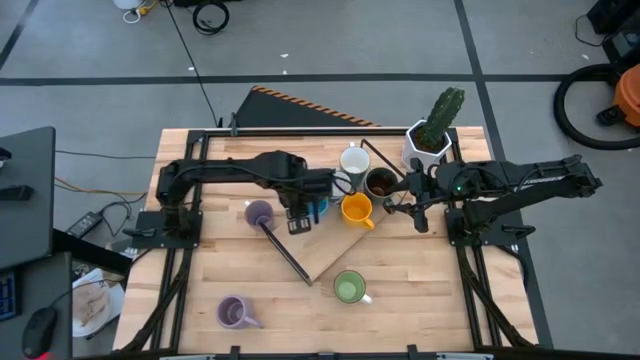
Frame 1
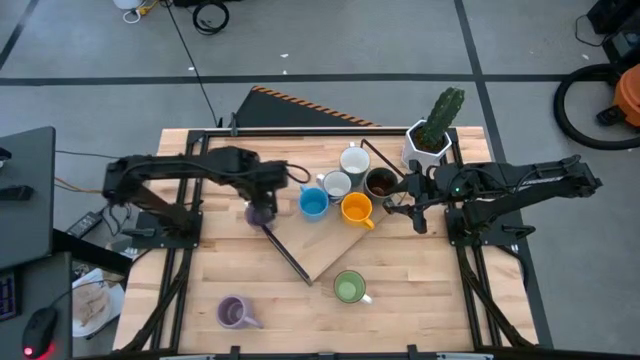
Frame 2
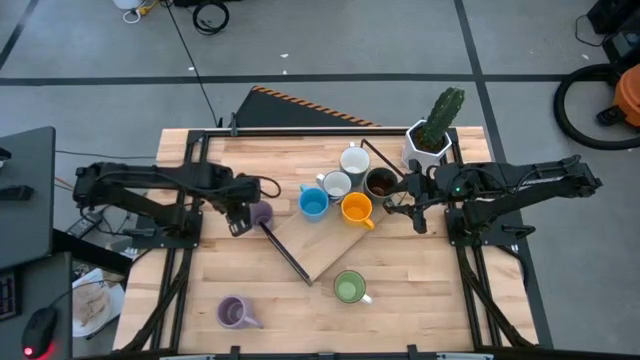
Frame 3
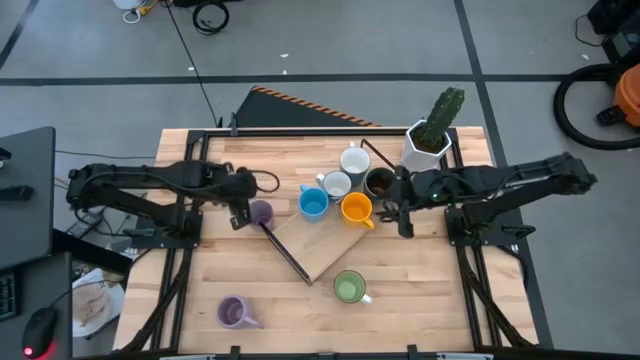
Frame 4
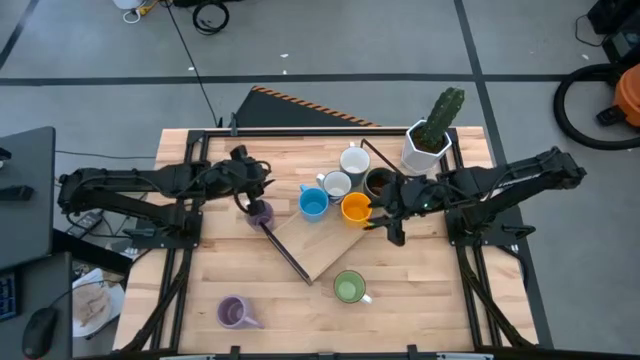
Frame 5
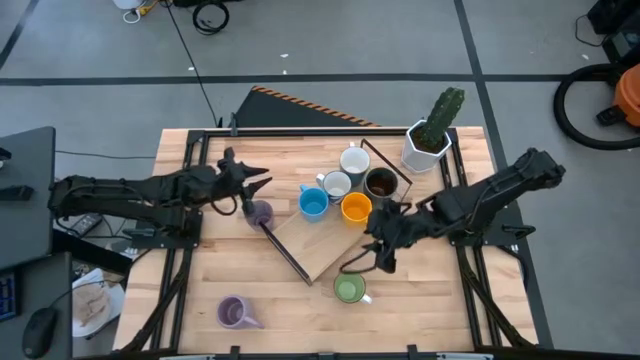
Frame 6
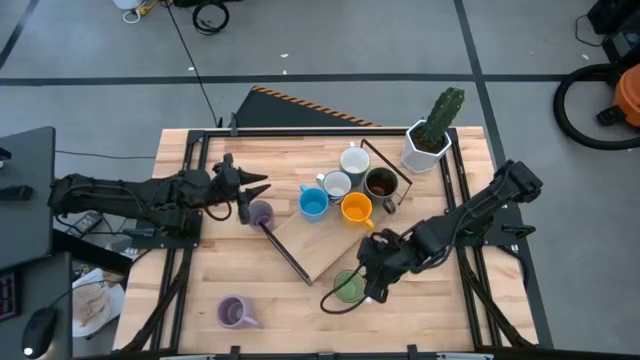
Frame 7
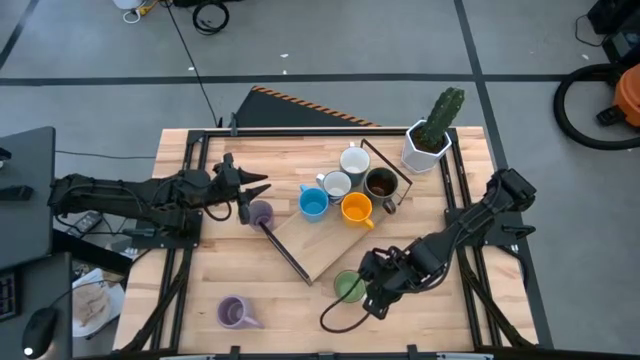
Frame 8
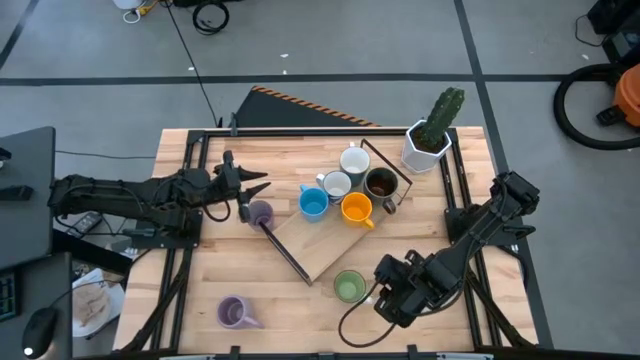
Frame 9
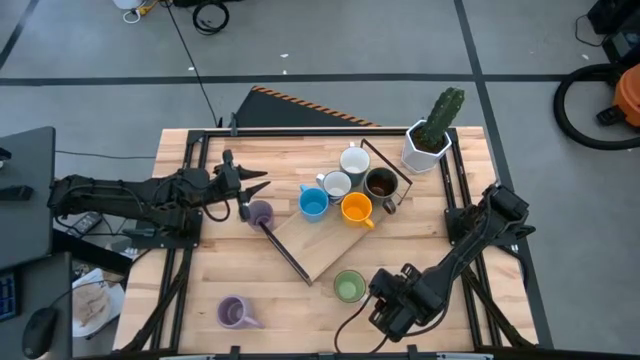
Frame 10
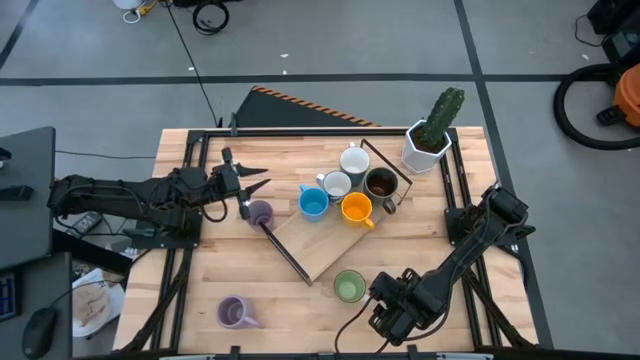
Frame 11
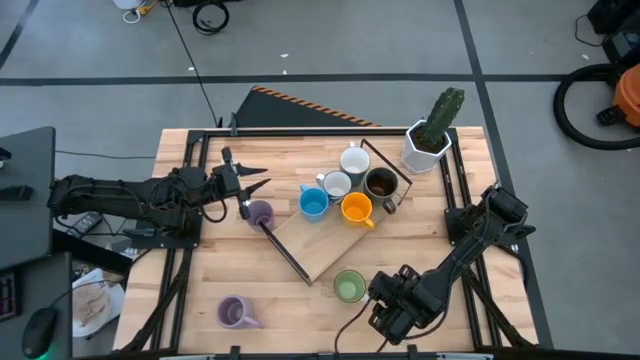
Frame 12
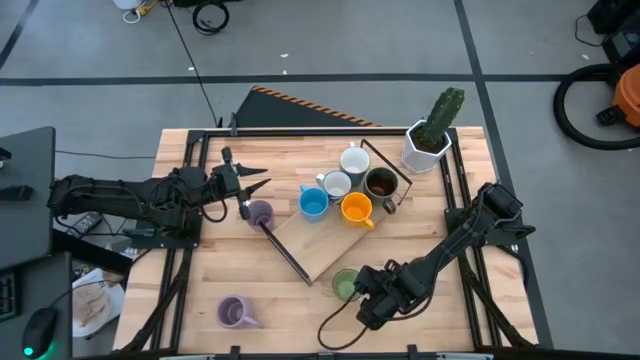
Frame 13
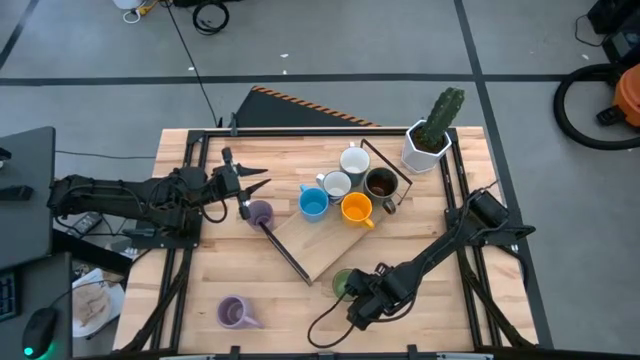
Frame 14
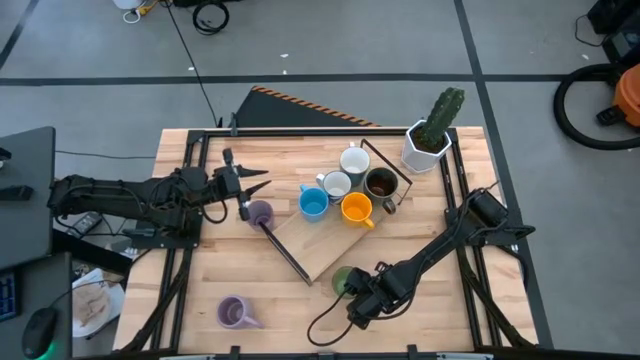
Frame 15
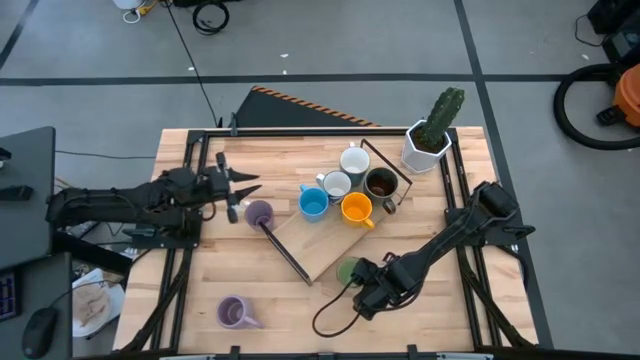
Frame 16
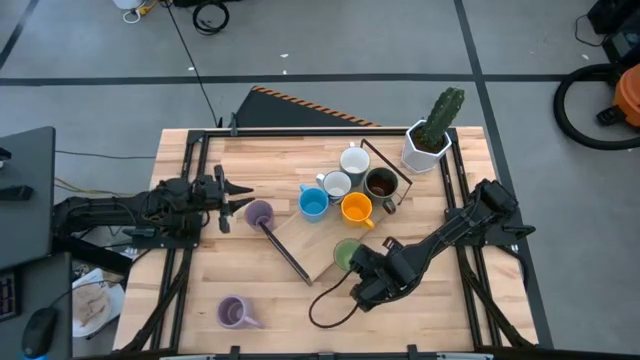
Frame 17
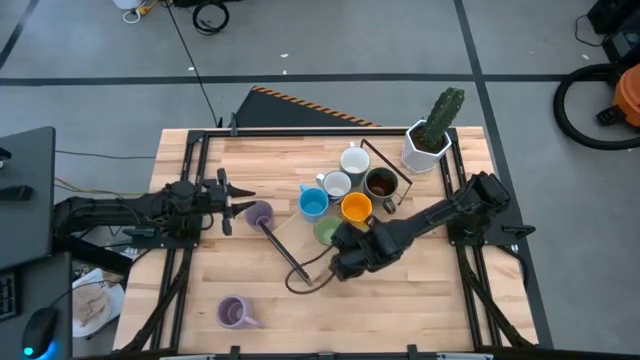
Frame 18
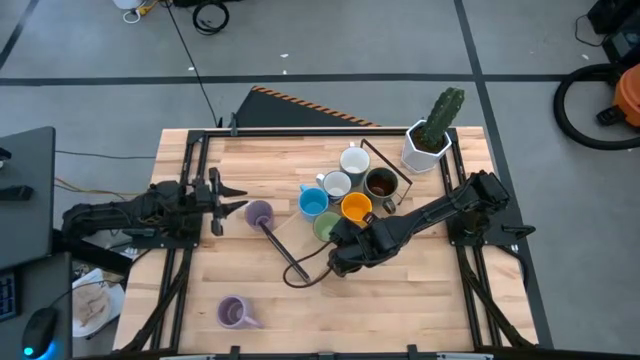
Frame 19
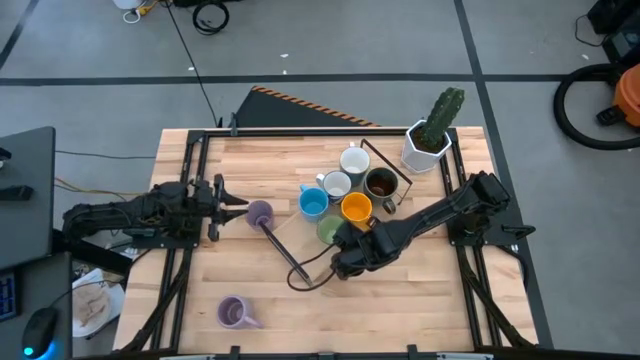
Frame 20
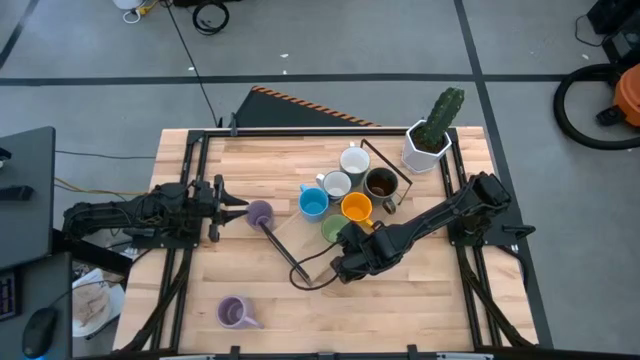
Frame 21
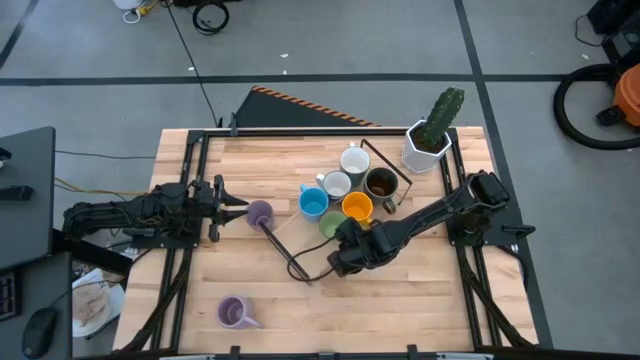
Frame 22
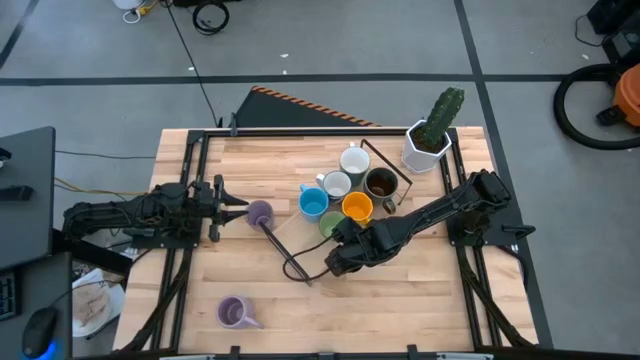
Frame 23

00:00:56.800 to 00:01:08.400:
Task: Place coffee mugs
Put the white-green mug on the shelf

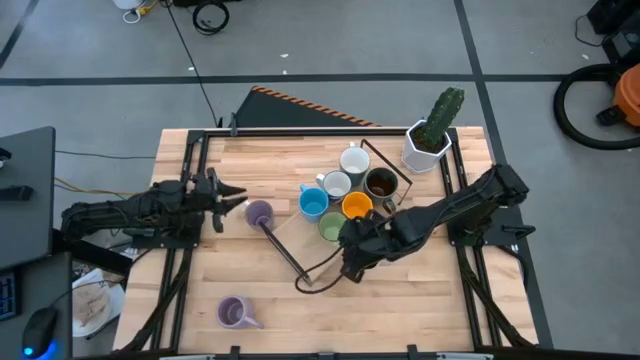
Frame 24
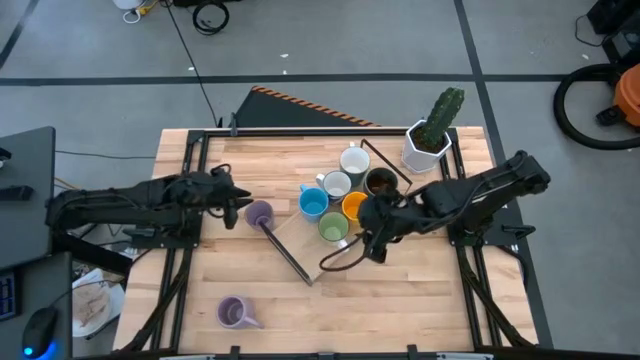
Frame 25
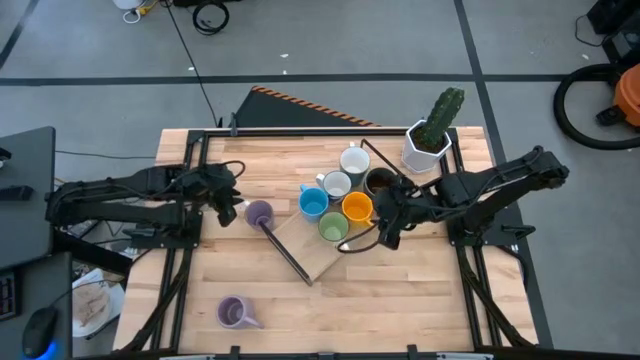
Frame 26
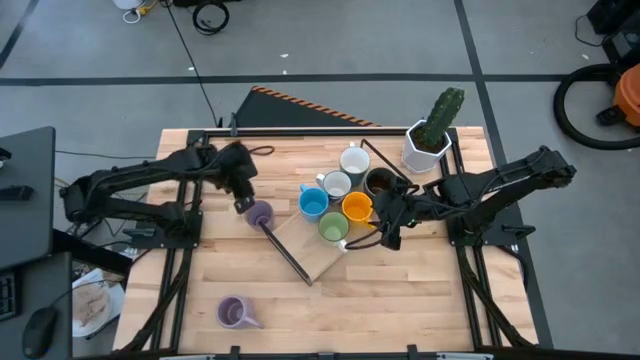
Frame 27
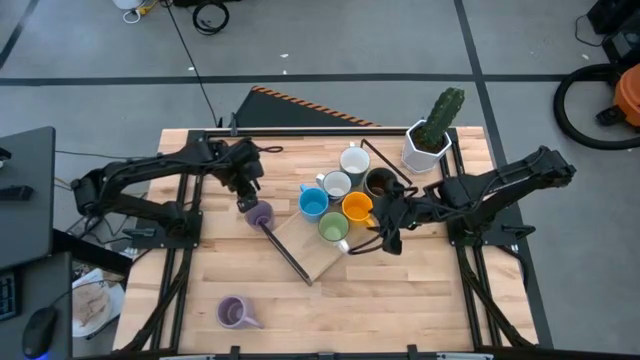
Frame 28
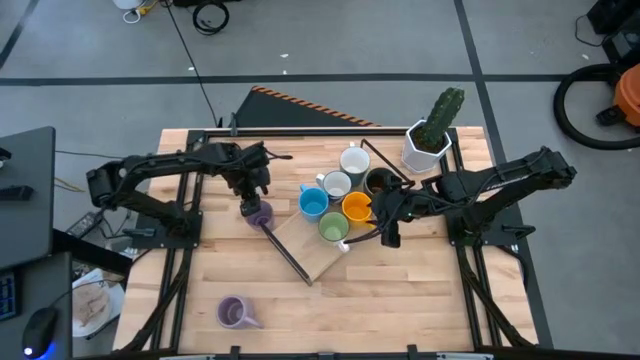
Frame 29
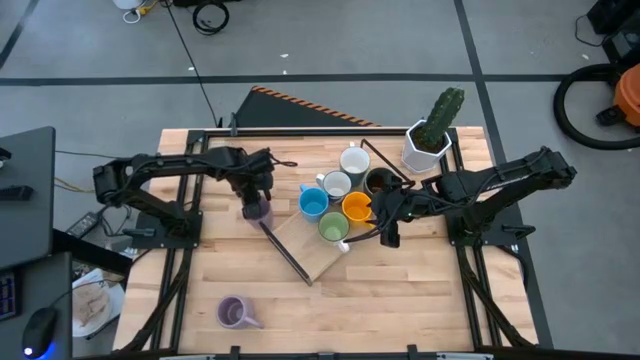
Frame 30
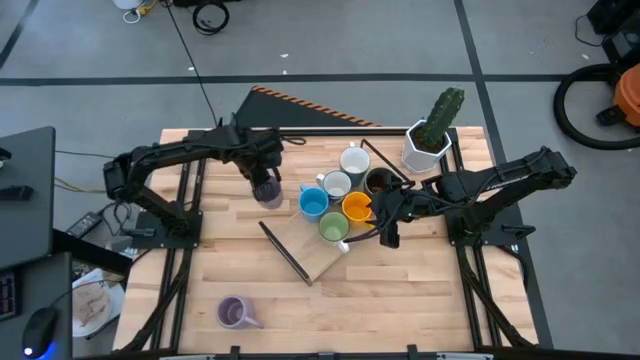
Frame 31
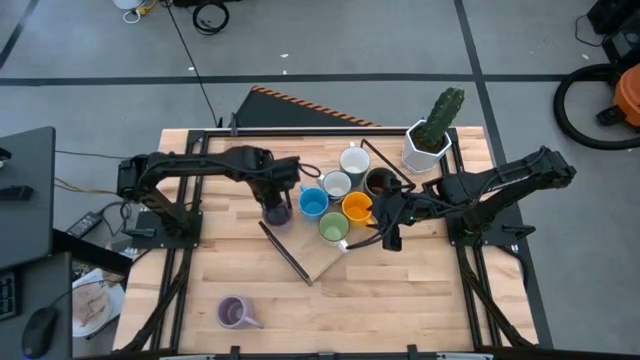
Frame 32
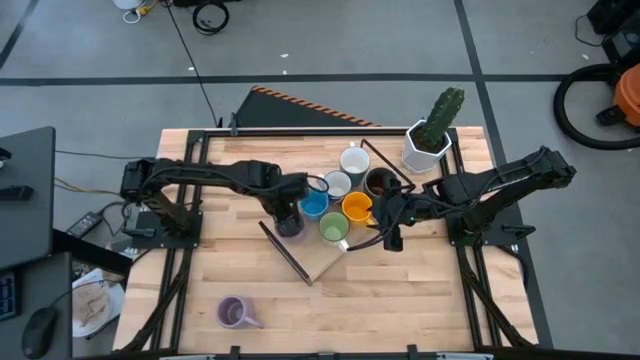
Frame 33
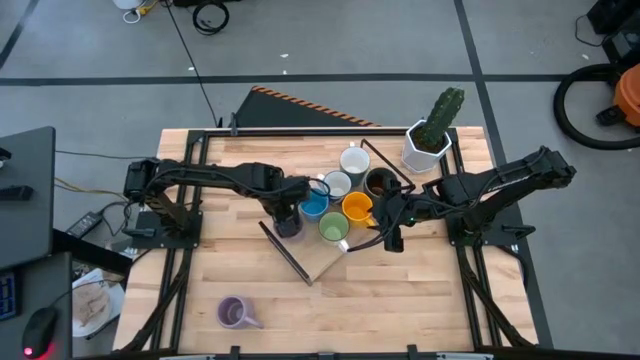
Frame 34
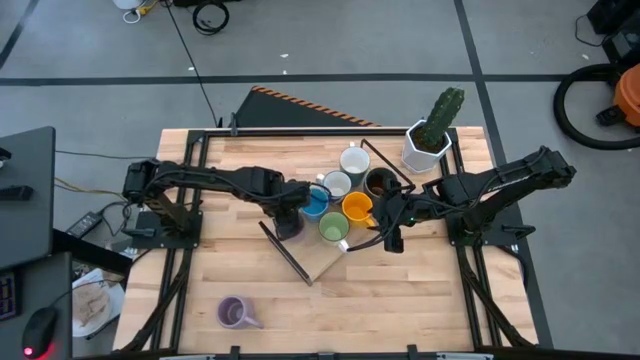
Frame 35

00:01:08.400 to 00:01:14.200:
Put the top violet mug on the shelf

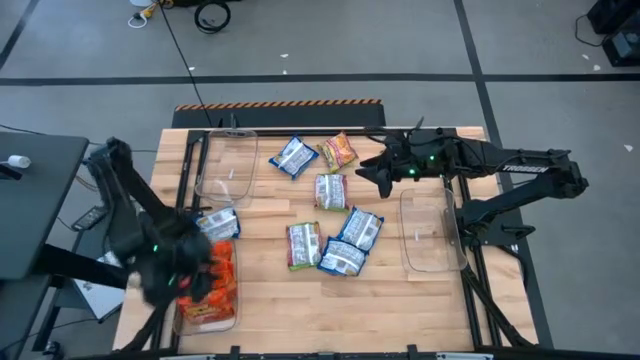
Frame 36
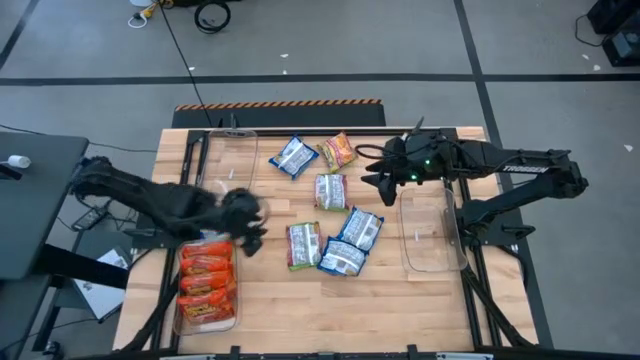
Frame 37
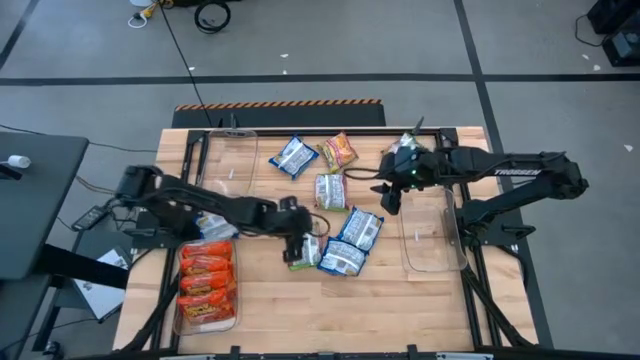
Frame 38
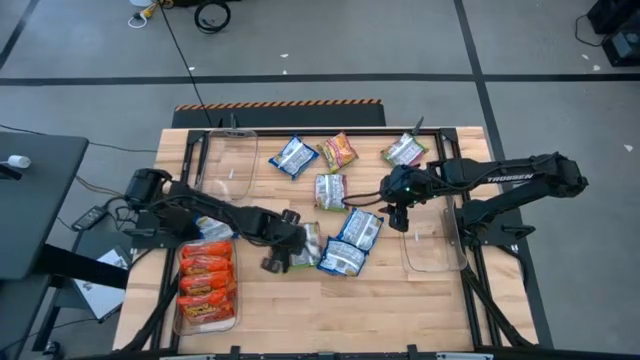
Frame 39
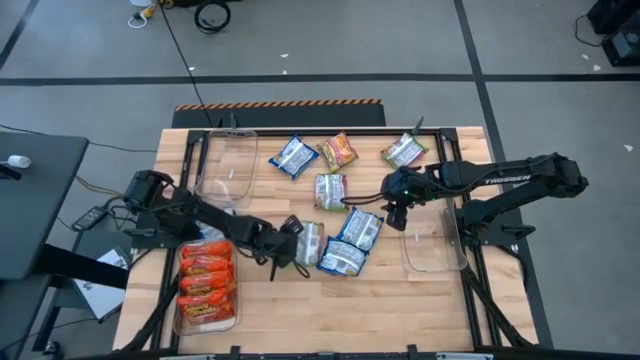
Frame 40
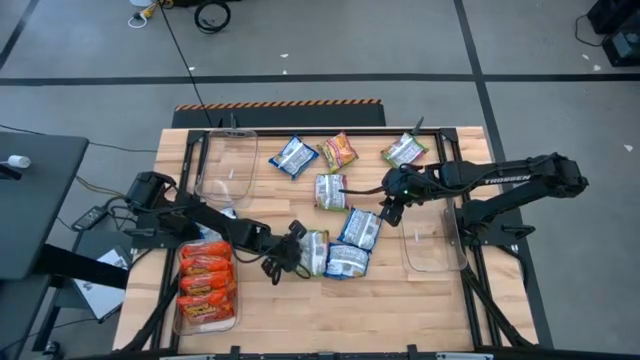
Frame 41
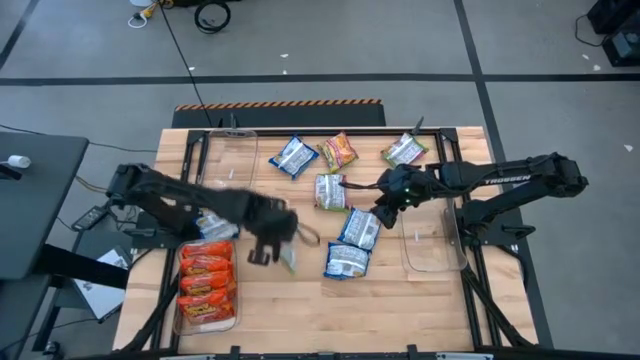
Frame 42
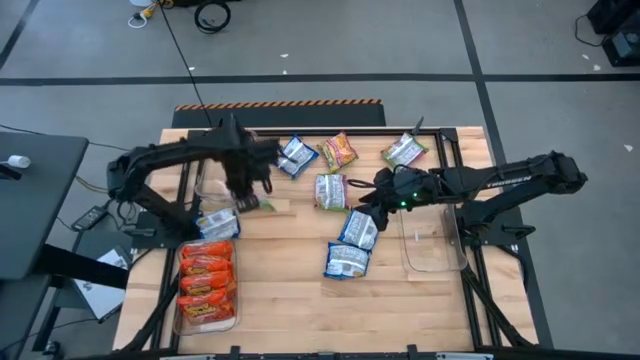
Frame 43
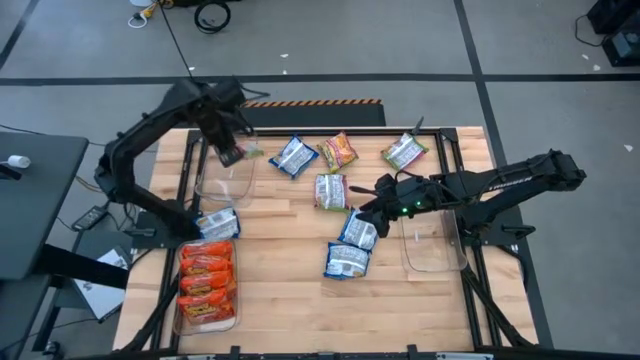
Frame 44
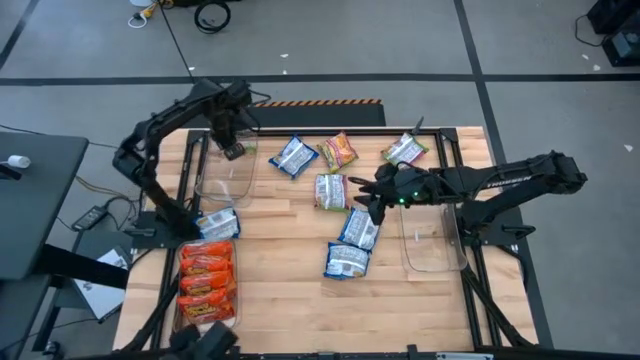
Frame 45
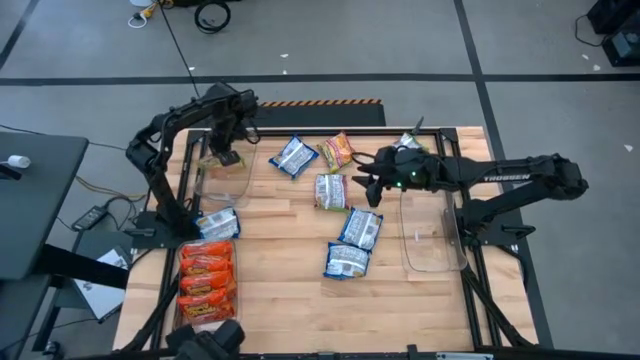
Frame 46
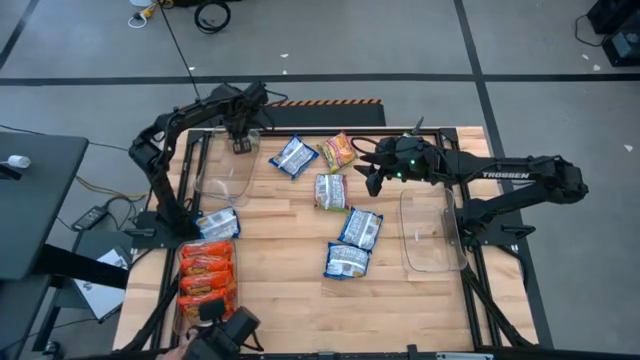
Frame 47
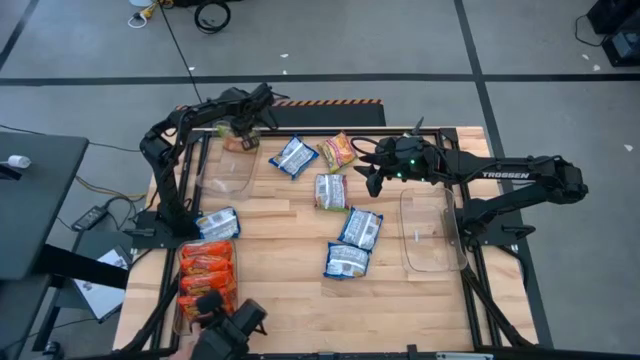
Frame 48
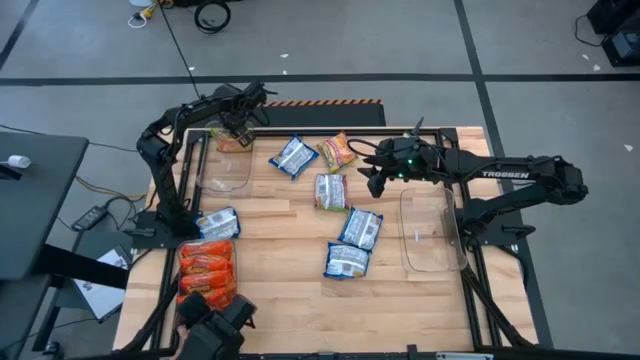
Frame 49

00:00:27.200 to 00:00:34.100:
Task: Sort Maruchan noodles
Put the green noodle pack into the top left transparent bin
